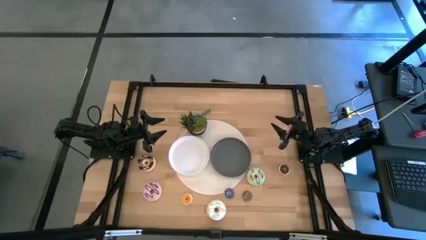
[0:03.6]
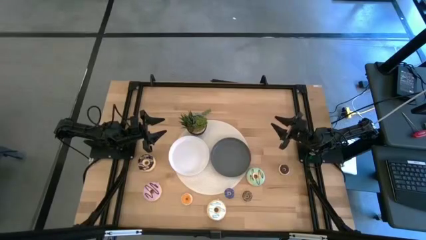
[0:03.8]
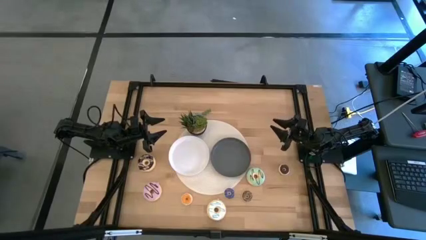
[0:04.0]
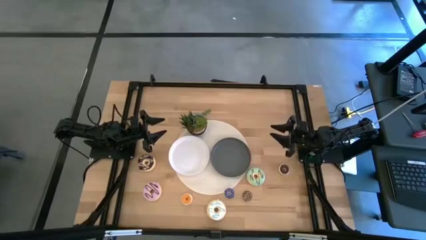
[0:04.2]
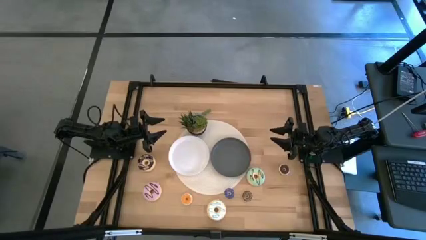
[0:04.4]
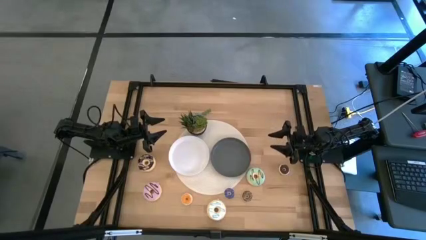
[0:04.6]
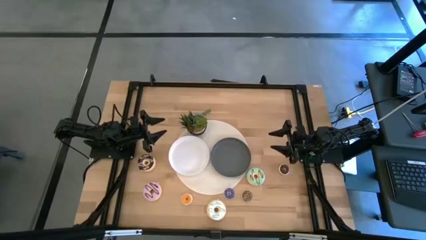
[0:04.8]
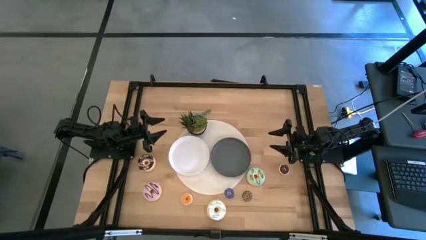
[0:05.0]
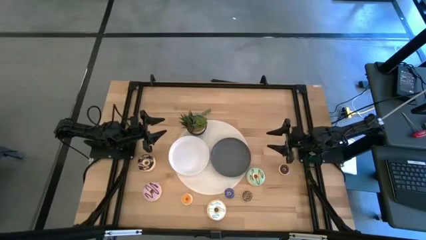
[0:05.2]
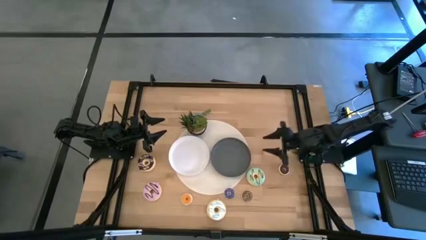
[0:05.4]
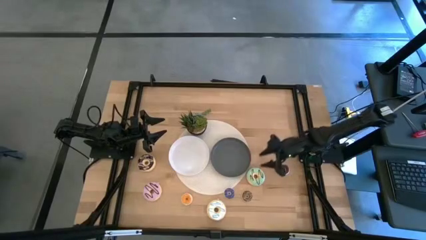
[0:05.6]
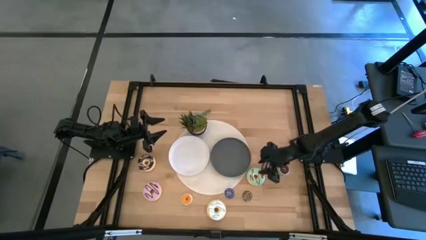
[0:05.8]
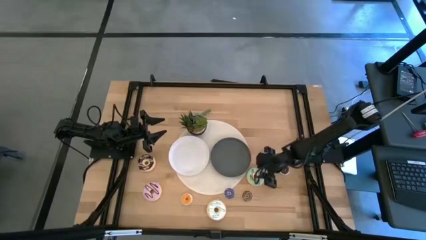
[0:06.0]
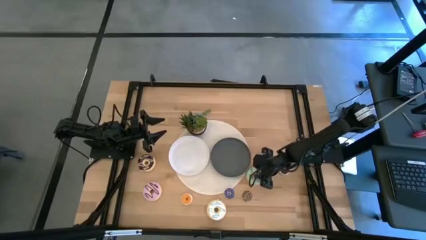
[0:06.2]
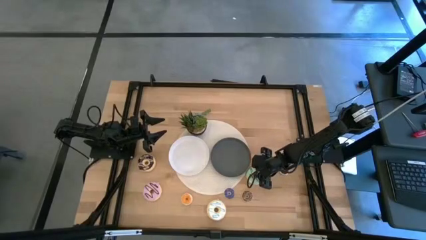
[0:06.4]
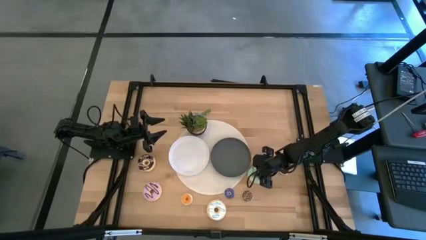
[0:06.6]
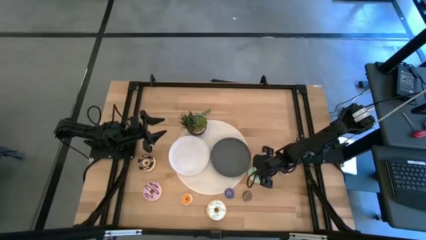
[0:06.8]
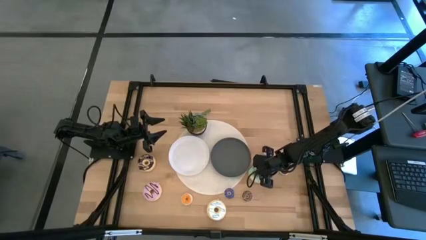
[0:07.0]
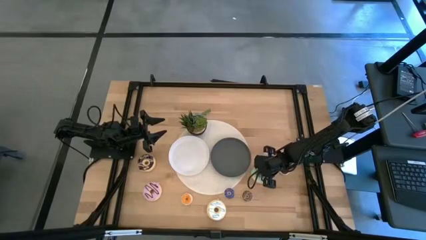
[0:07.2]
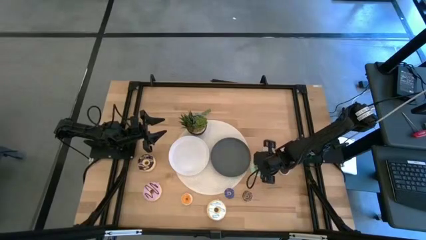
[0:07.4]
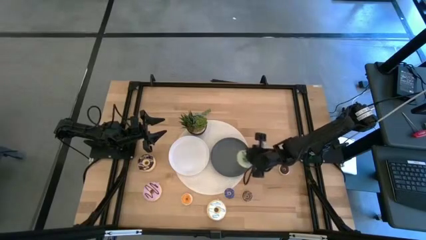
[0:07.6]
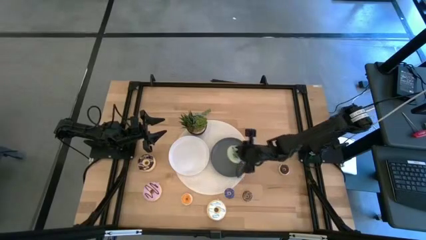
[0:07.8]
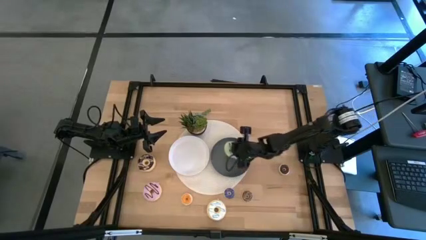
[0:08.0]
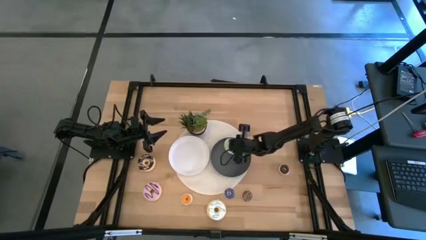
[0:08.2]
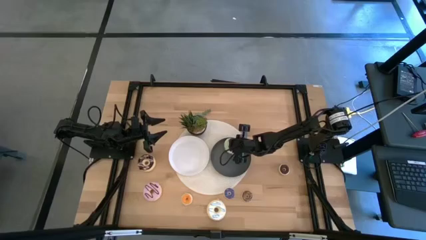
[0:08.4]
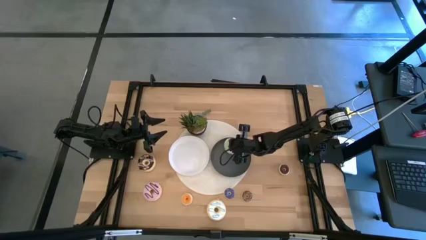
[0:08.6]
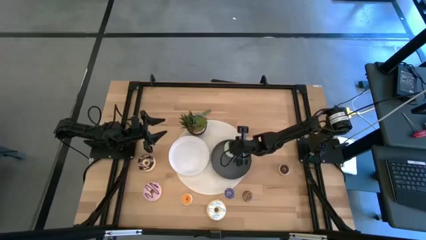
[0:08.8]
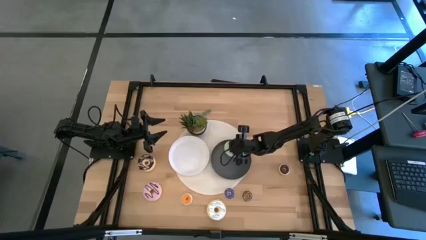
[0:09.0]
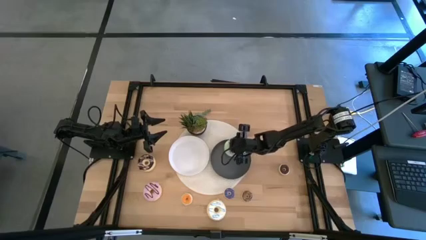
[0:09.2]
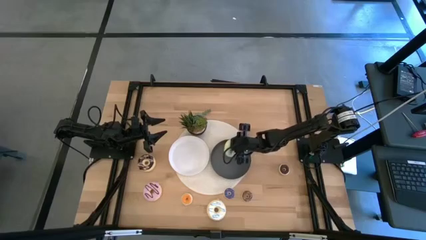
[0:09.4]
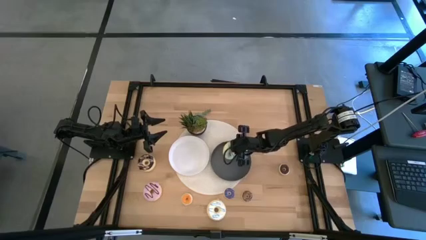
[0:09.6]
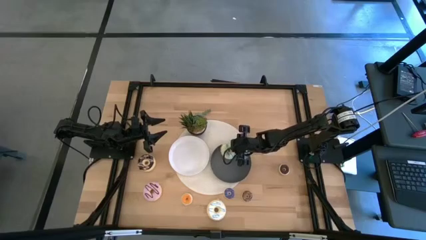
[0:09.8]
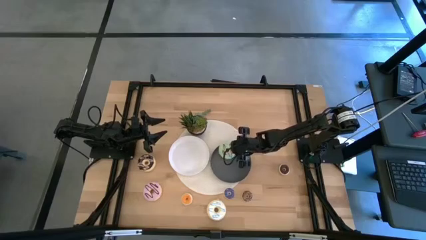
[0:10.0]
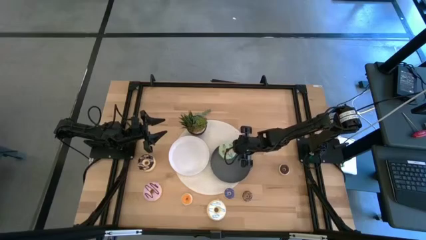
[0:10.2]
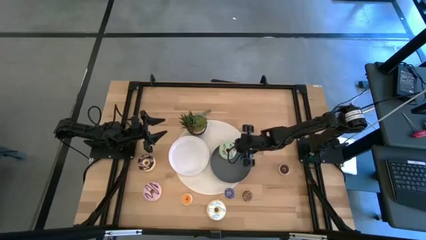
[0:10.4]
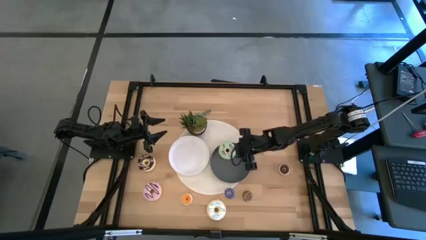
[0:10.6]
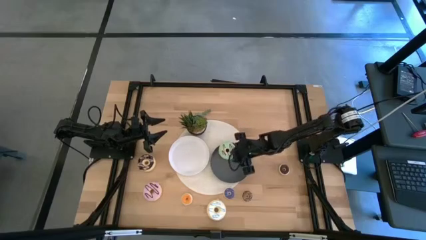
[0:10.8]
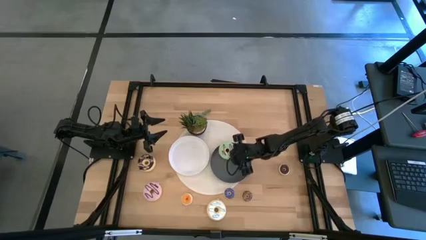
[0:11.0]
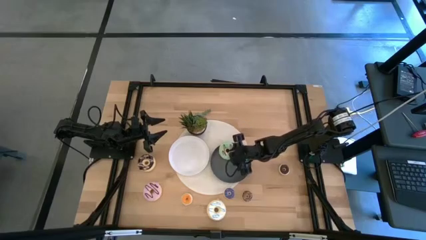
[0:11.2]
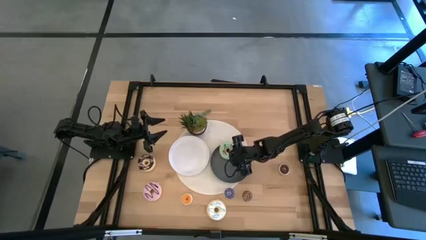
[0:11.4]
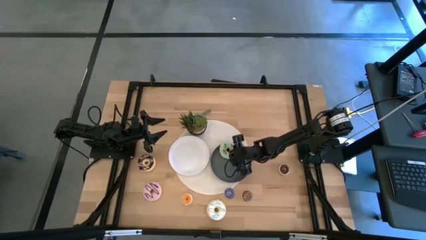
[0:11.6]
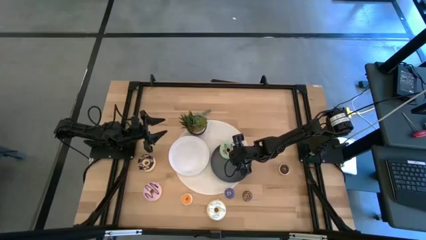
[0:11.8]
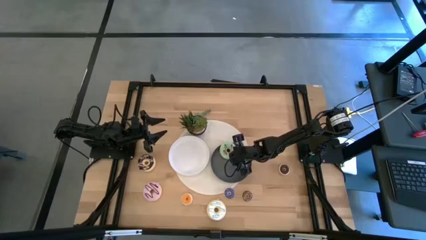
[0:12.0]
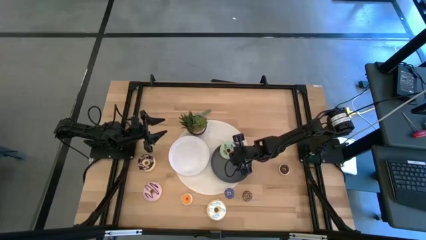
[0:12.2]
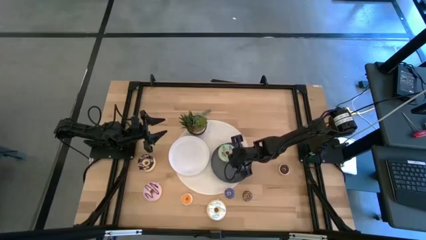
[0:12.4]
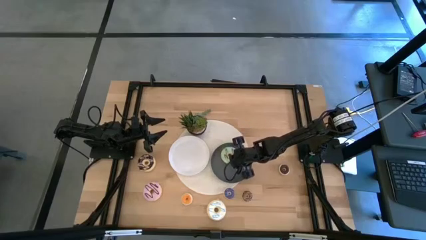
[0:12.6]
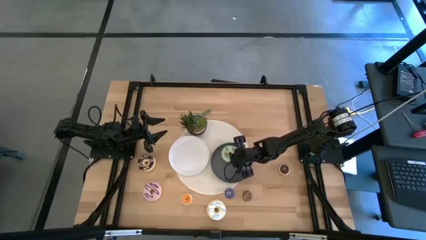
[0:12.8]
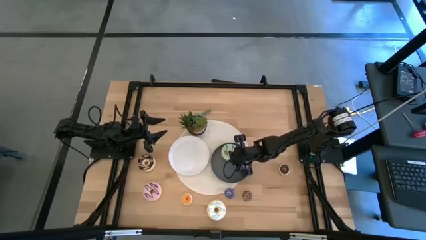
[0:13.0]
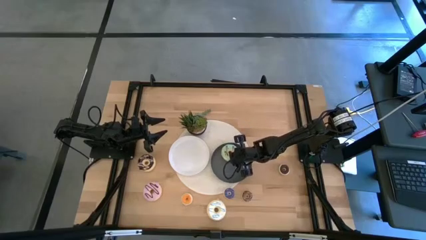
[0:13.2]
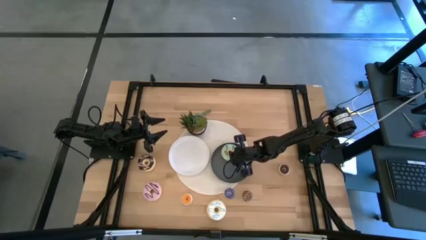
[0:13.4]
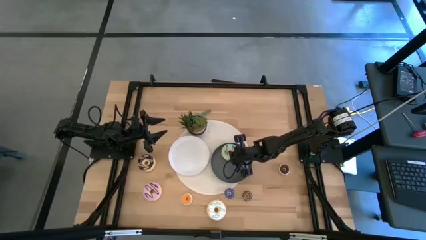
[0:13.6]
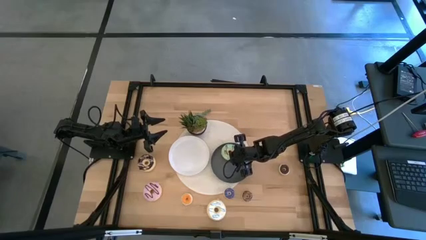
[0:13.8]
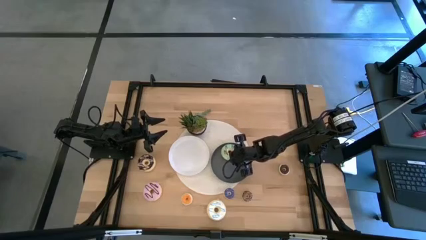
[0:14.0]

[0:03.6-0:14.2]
Task: Pick & Place donuts
Put the large green donut on the gray plate
